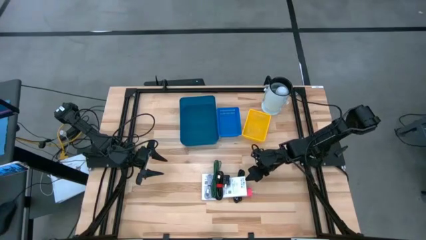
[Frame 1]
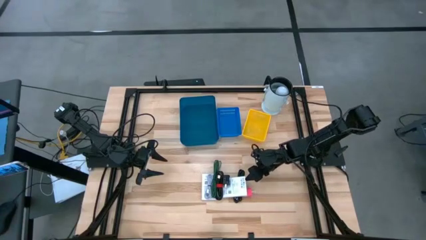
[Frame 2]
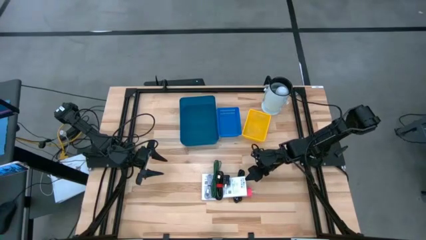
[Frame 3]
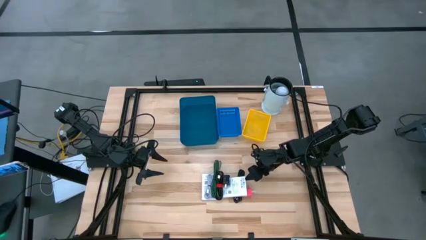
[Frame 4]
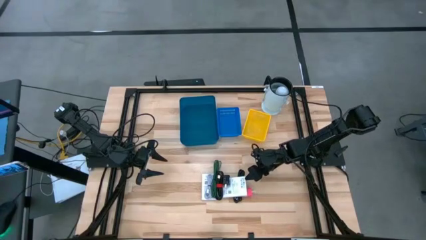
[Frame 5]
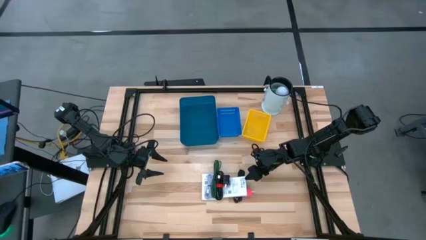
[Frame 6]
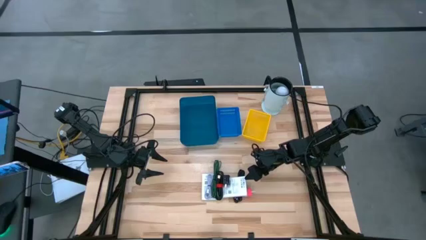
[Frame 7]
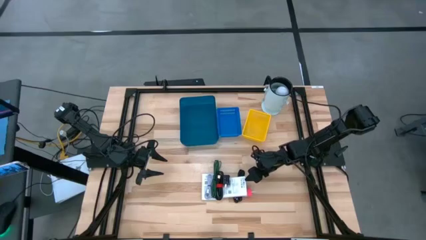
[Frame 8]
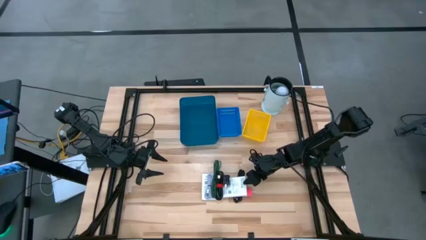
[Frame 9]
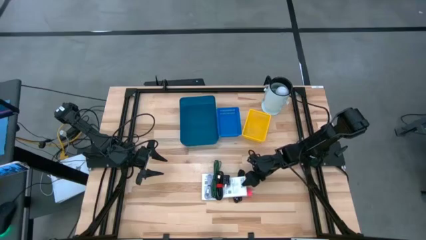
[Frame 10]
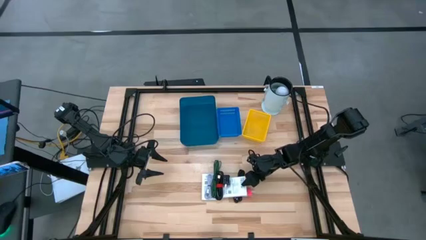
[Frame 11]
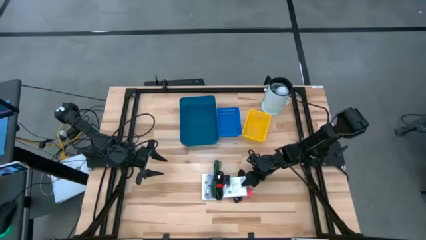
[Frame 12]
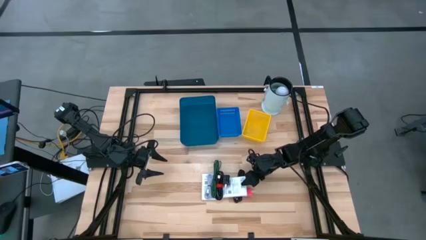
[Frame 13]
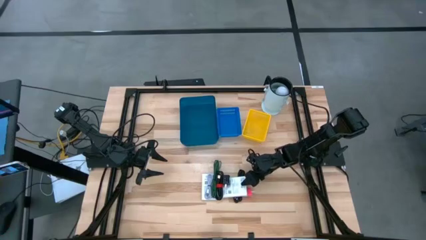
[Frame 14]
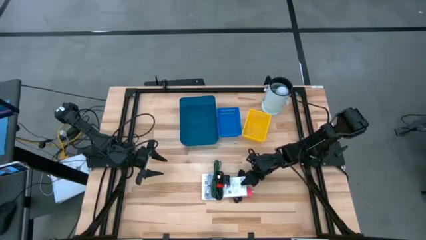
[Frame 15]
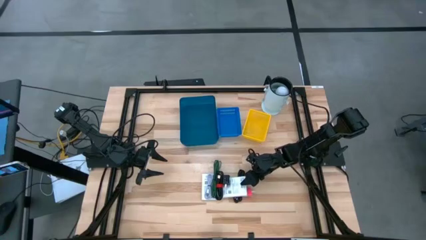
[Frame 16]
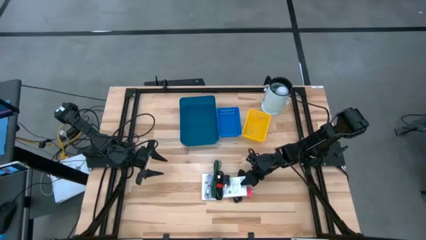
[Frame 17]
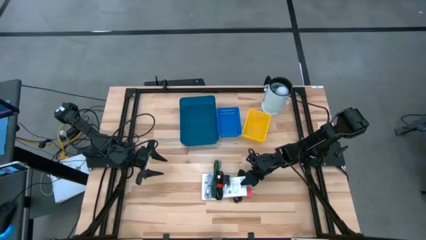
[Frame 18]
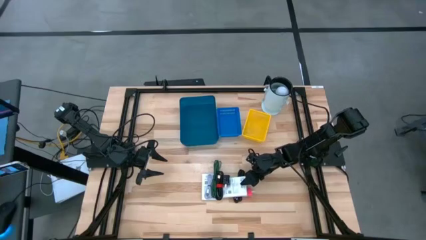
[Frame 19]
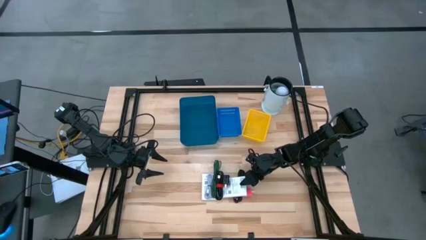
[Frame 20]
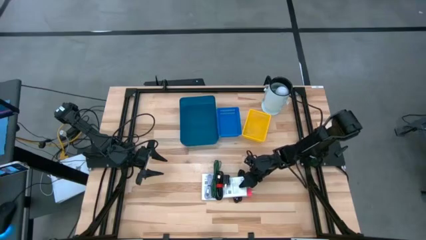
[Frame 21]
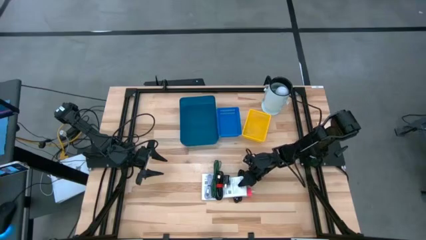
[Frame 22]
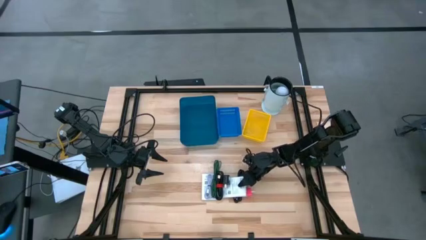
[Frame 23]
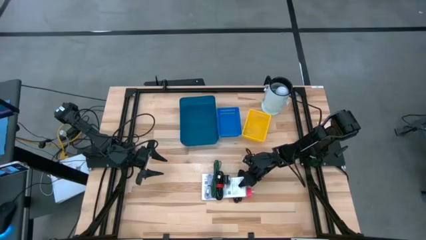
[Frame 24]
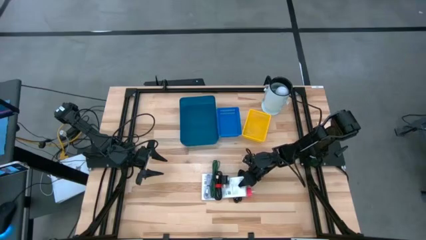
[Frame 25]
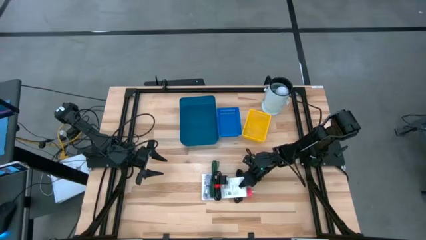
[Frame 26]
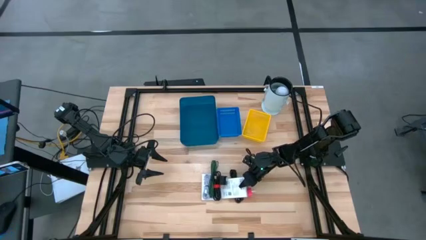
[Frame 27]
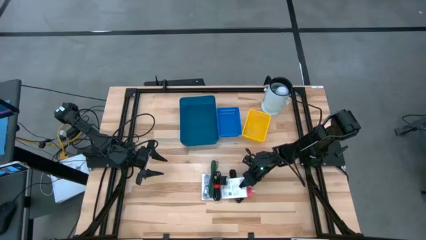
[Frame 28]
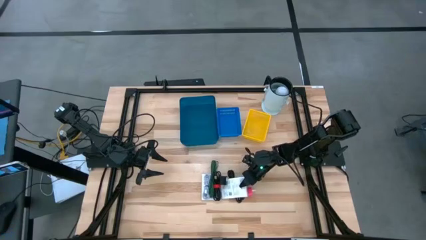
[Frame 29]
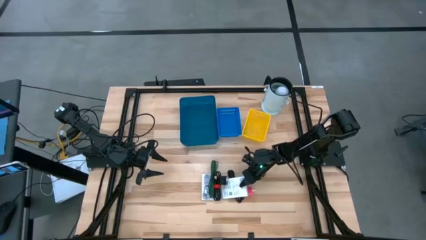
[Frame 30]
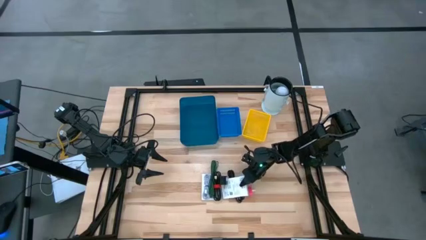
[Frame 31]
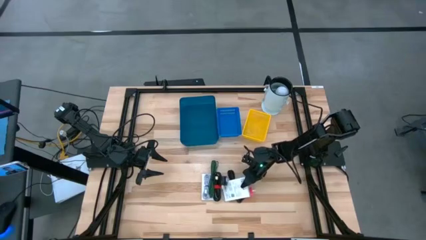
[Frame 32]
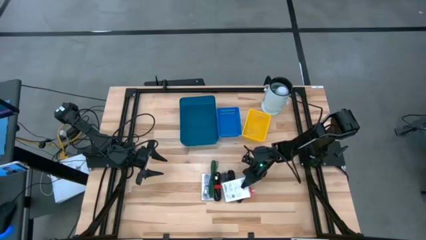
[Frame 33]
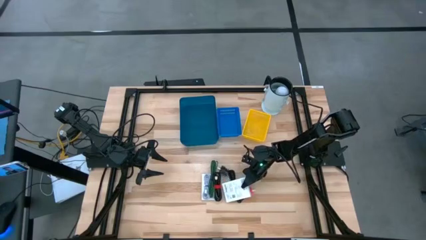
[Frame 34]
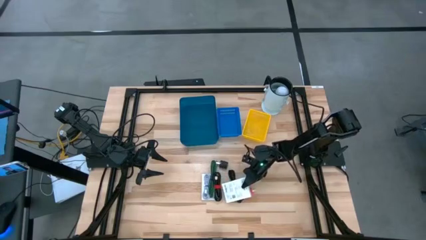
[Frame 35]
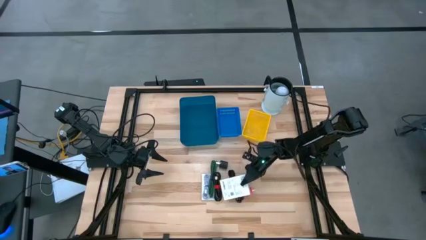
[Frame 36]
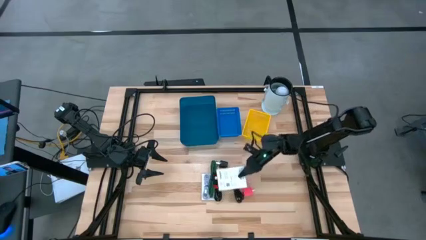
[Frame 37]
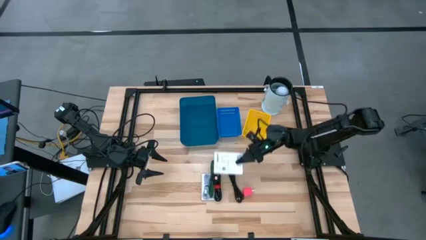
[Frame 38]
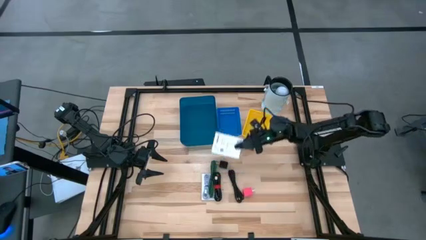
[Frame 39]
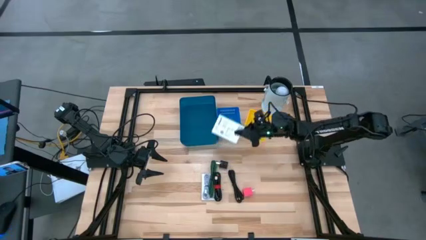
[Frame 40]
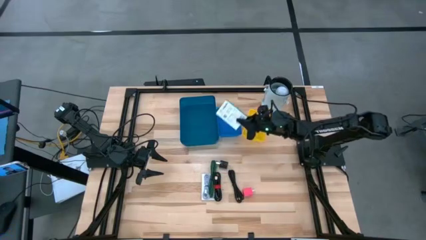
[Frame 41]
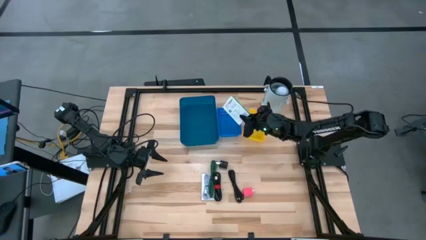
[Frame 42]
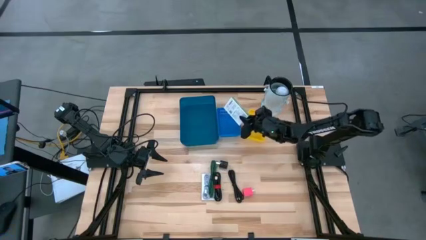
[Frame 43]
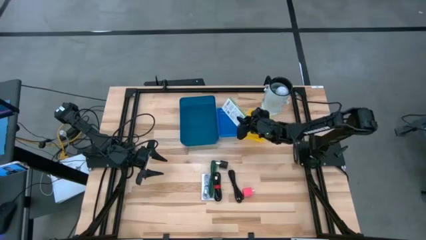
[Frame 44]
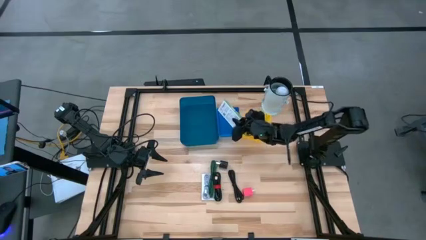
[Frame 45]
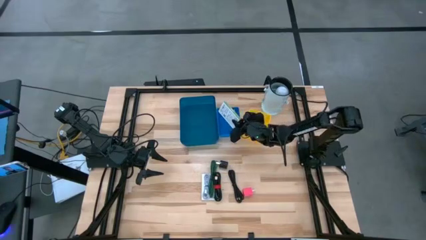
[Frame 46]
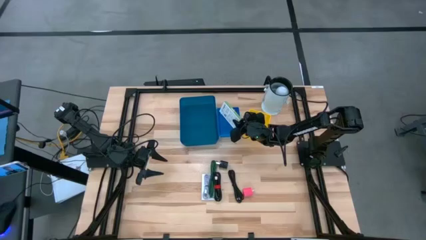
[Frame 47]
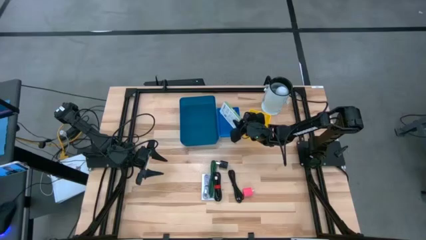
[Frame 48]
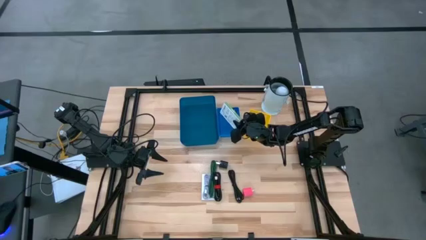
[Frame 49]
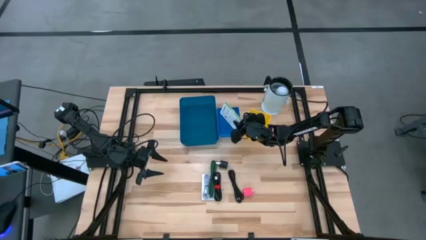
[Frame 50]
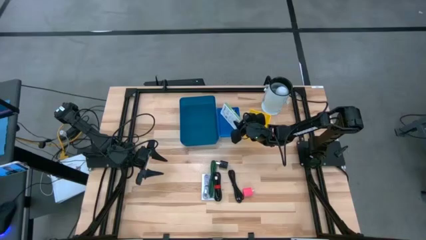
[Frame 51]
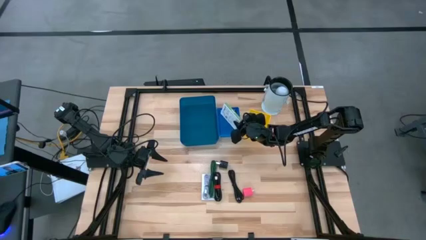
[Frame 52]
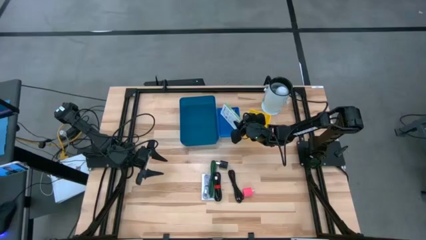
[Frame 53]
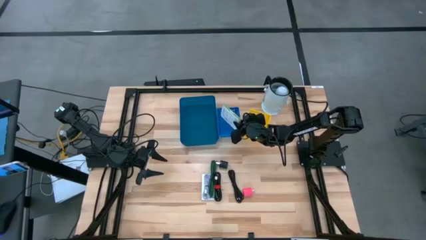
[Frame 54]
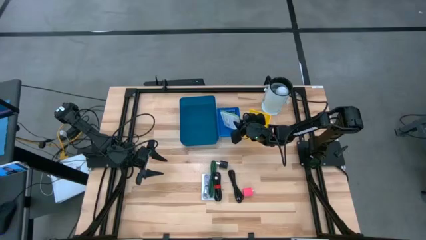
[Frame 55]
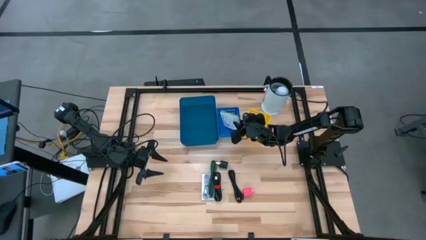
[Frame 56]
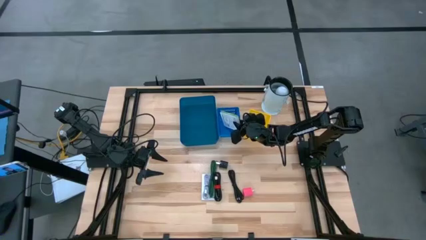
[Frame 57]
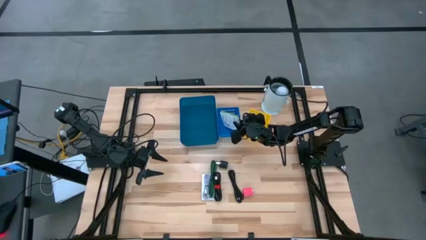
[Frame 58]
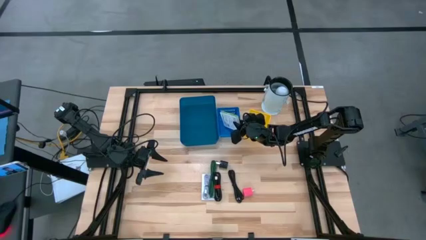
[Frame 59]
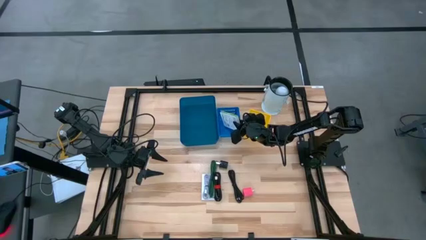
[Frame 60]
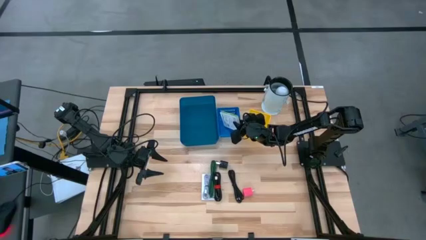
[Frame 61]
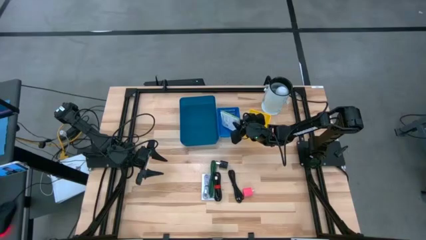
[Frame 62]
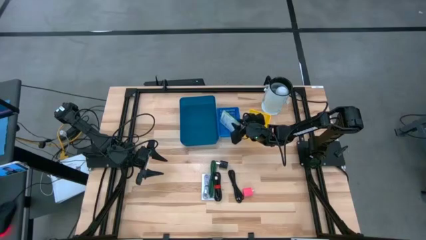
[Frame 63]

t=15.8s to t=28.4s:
Task: Pick and place items into bin
Put the right white card reader box into the blue bin
